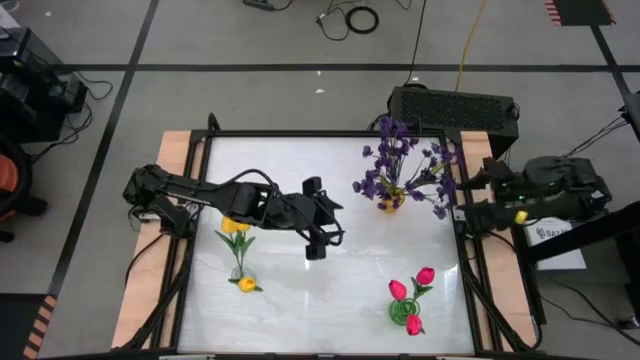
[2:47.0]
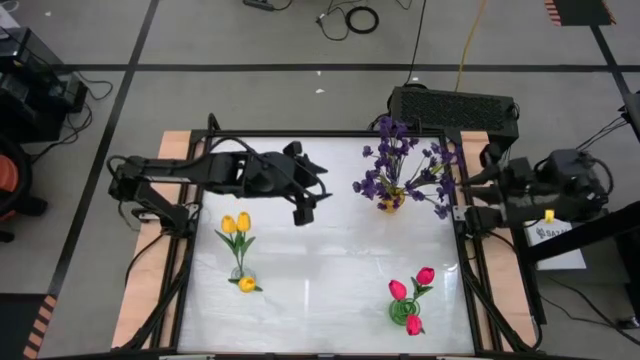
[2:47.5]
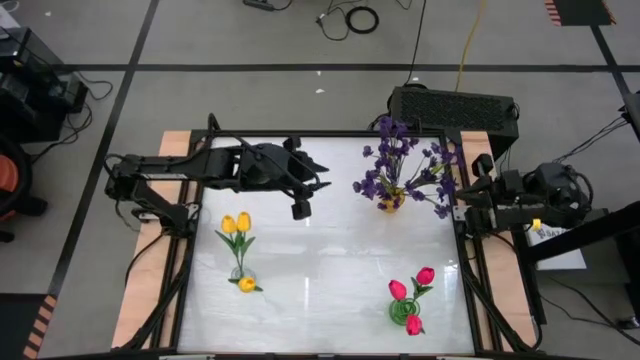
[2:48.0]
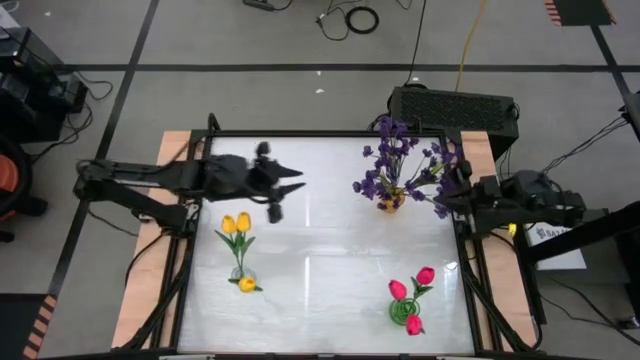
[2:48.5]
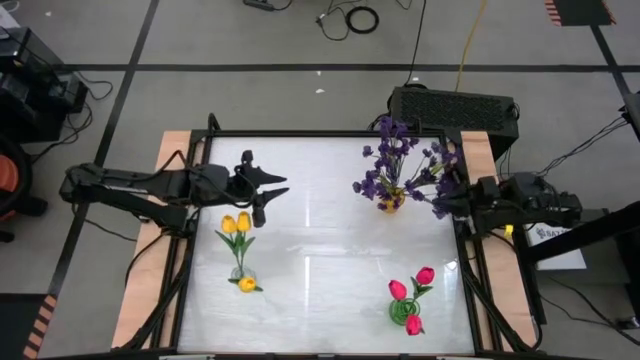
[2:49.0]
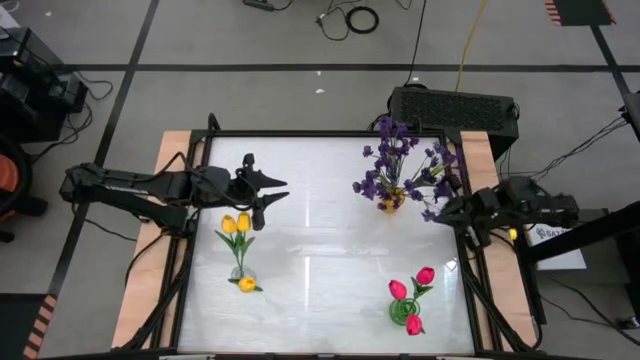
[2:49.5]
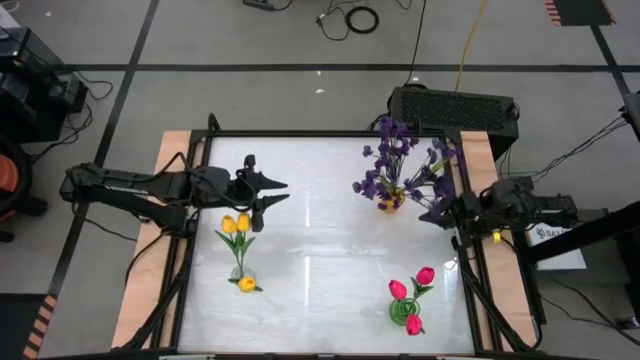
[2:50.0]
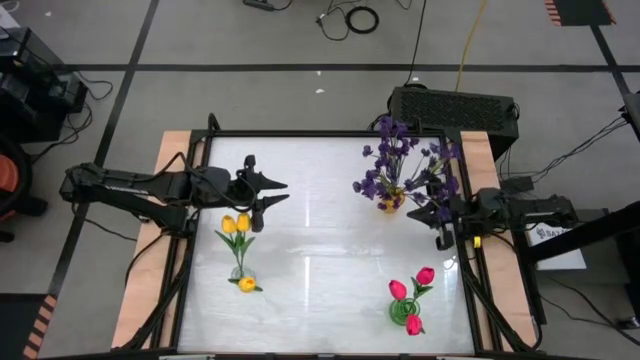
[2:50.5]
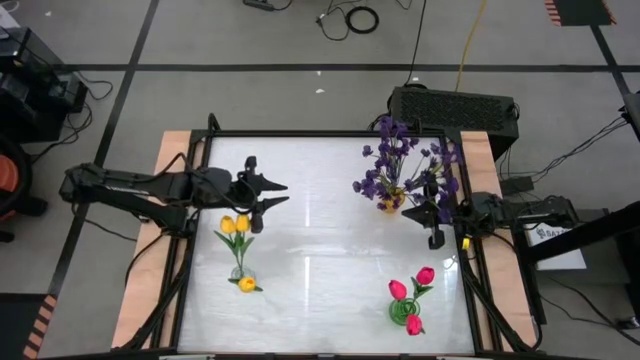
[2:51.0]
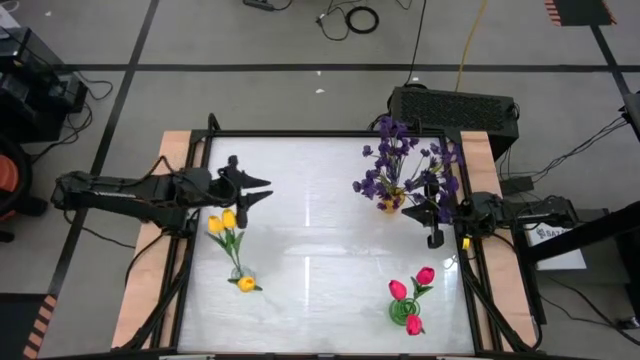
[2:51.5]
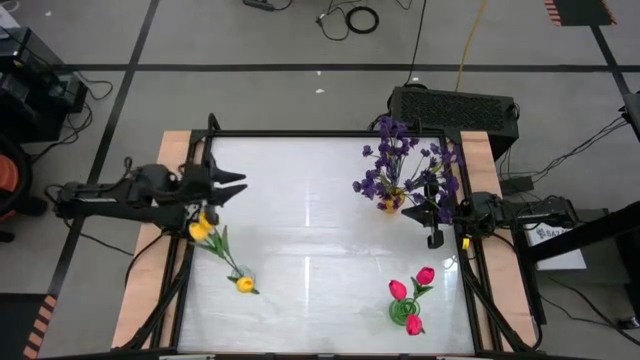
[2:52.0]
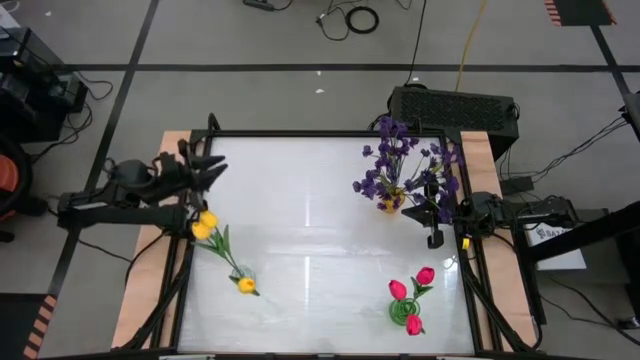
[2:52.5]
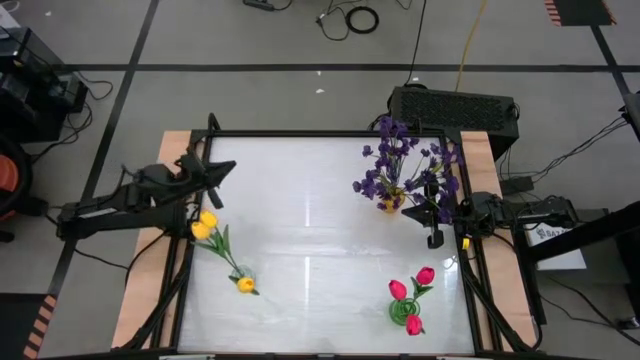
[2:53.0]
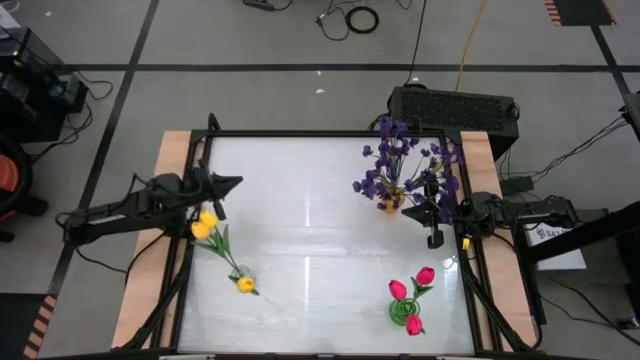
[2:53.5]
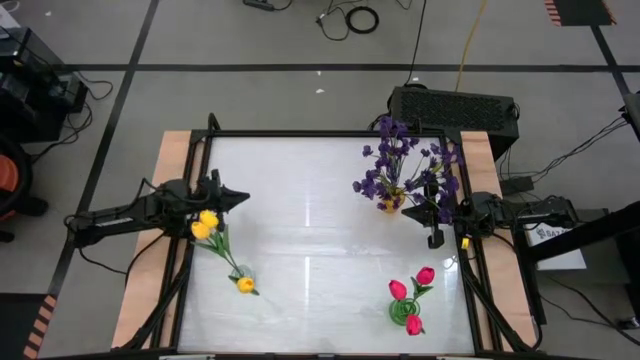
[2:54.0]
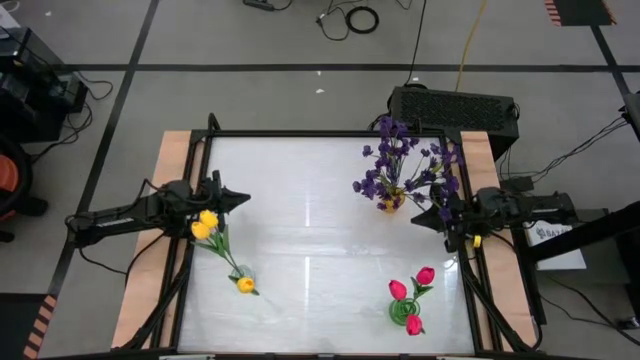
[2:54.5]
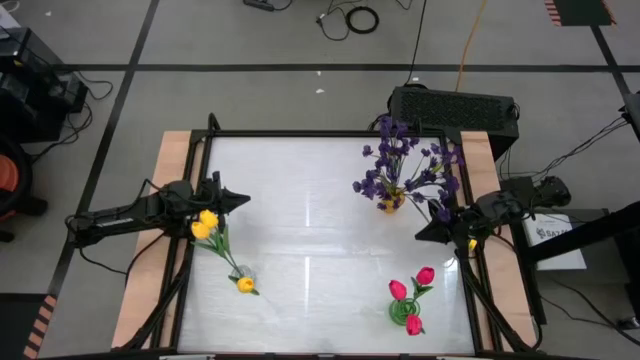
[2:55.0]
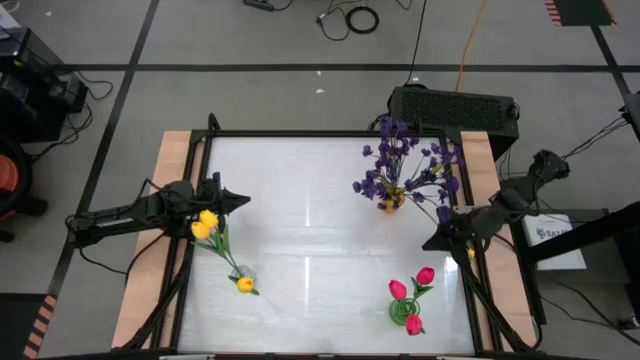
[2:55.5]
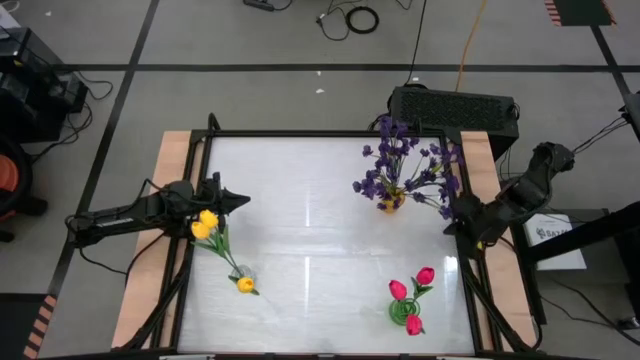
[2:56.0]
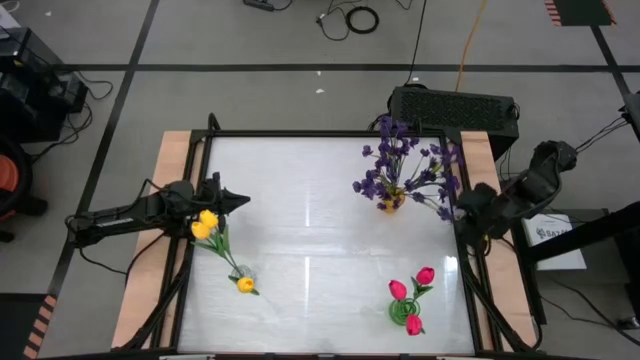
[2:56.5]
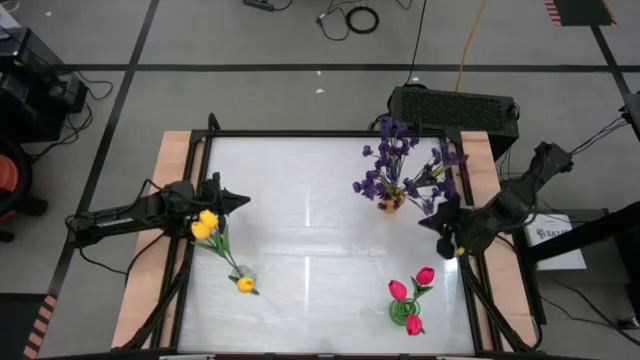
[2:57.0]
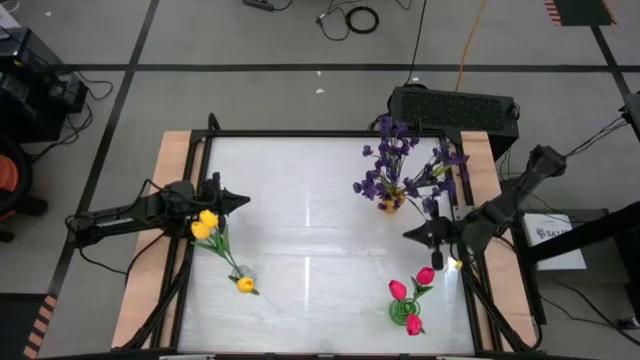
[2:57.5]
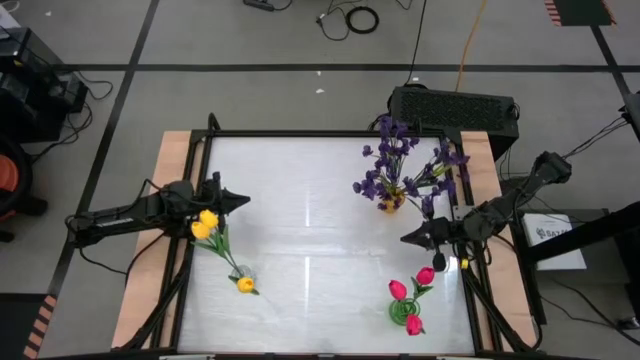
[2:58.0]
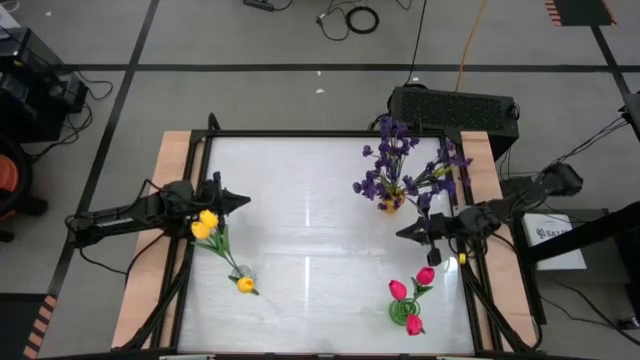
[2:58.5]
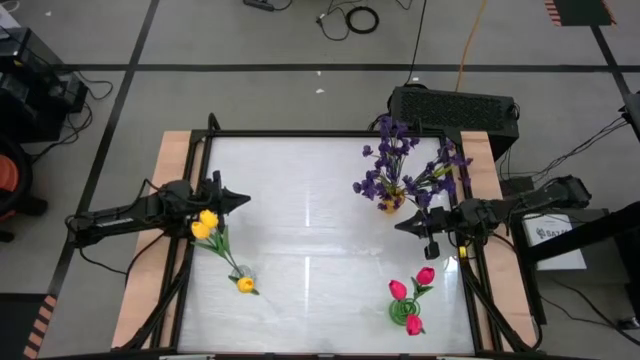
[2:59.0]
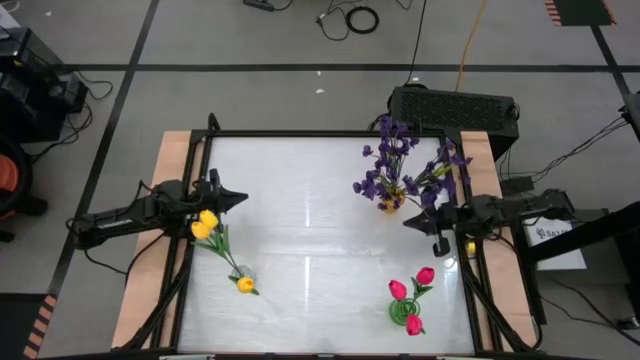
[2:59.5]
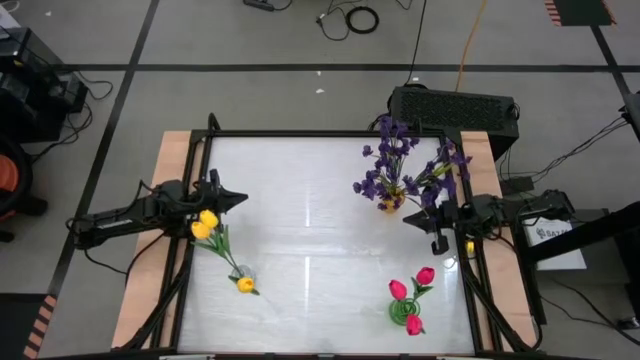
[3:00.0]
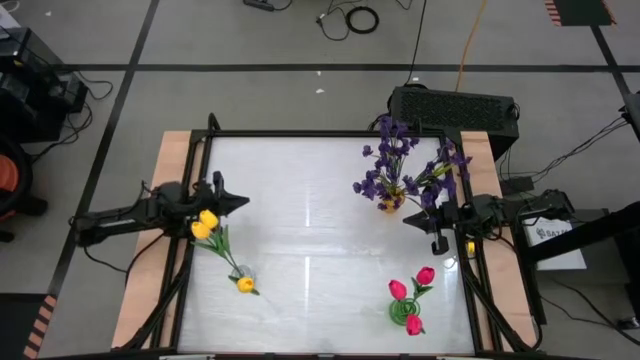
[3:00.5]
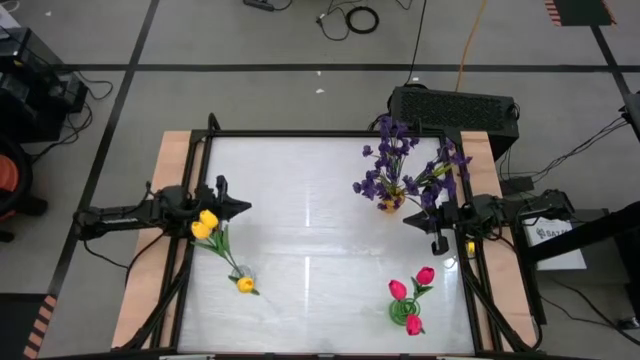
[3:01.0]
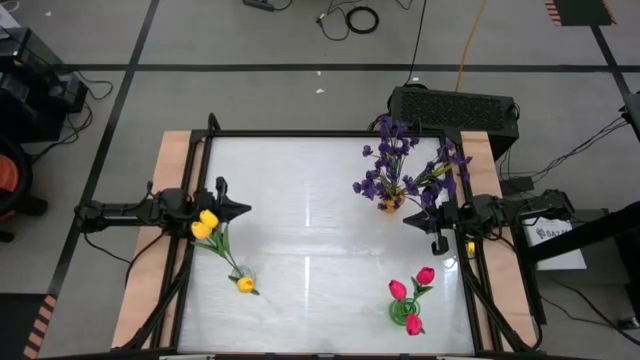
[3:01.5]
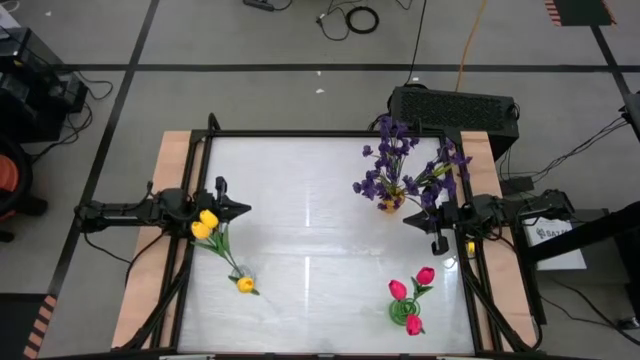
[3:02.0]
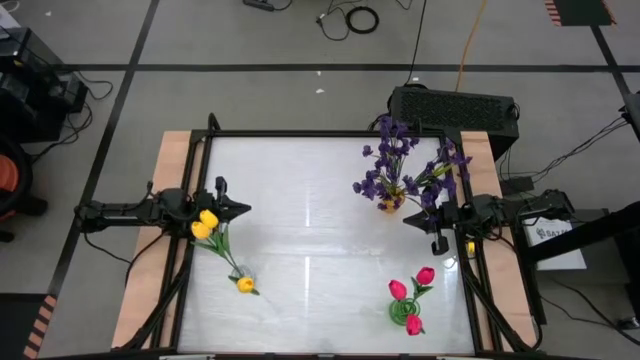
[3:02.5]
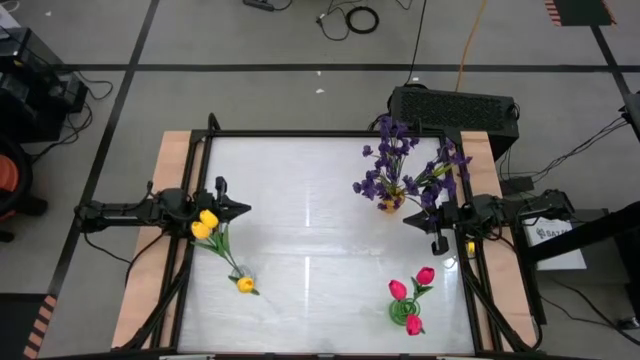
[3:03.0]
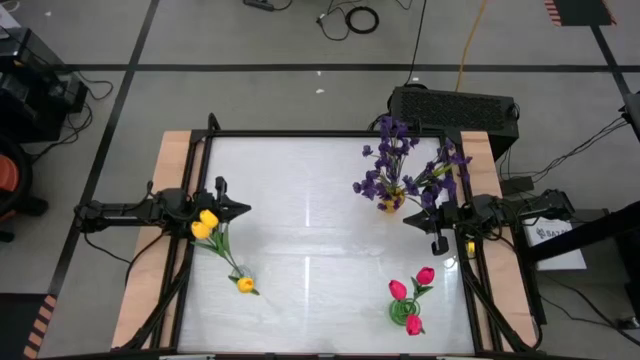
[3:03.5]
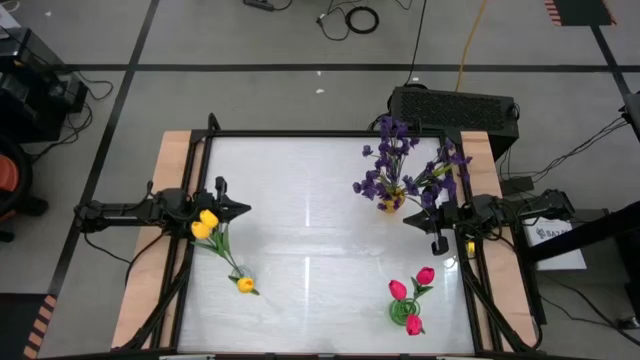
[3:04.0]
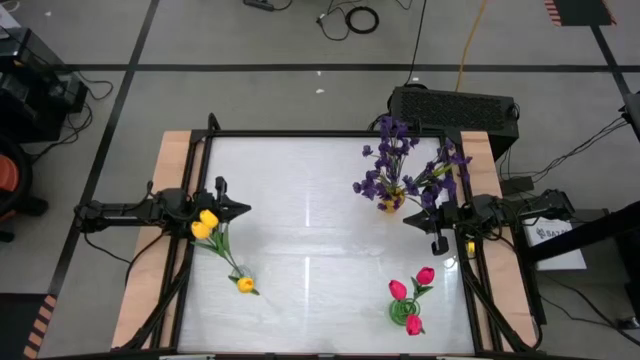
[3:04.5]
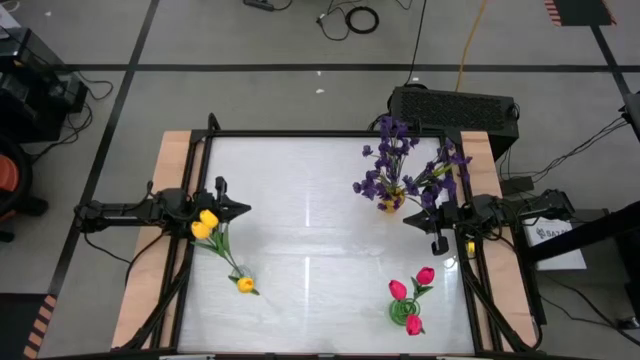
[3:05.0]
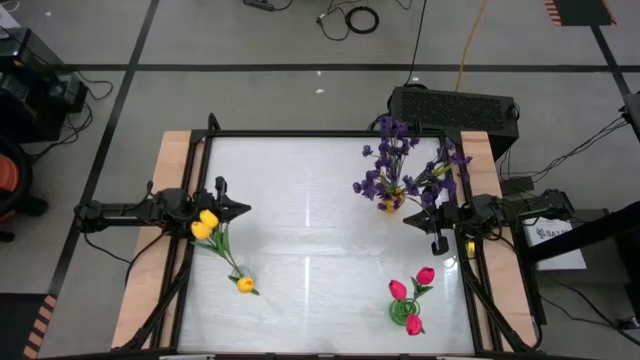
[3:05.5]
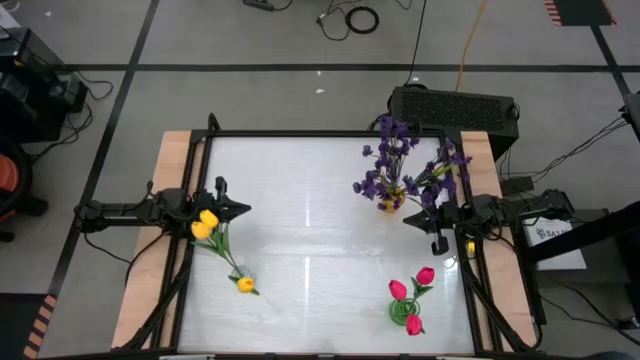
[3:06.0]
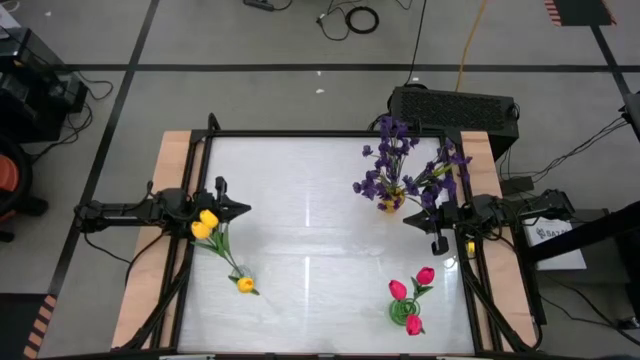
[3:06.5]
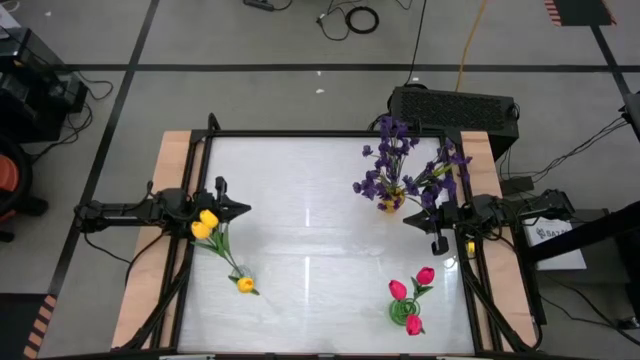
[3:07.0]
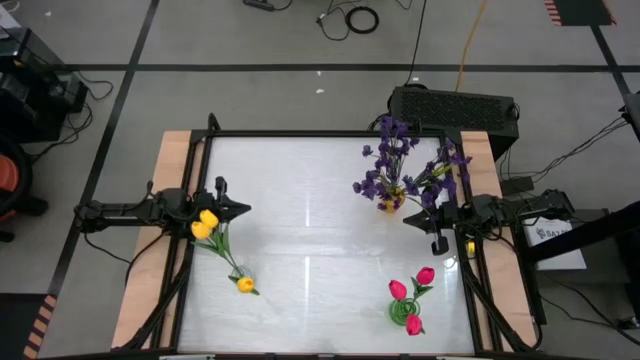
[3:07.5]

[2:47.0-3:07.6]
Task: Sort flowers into vase by color
Return to Home Position
